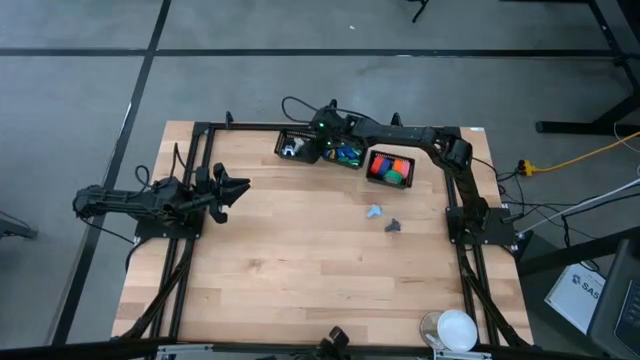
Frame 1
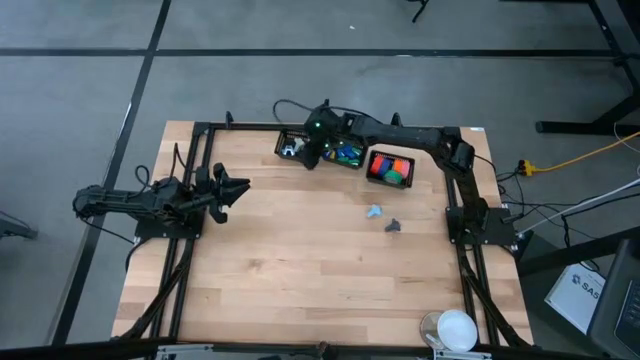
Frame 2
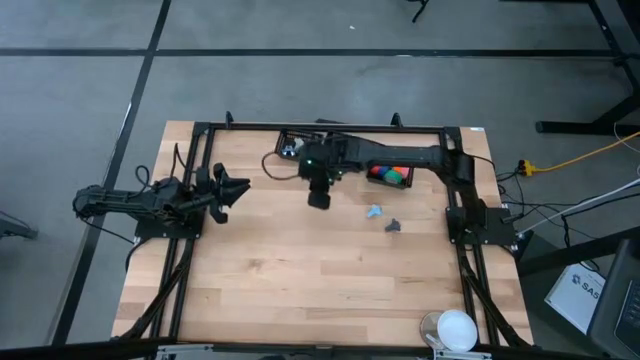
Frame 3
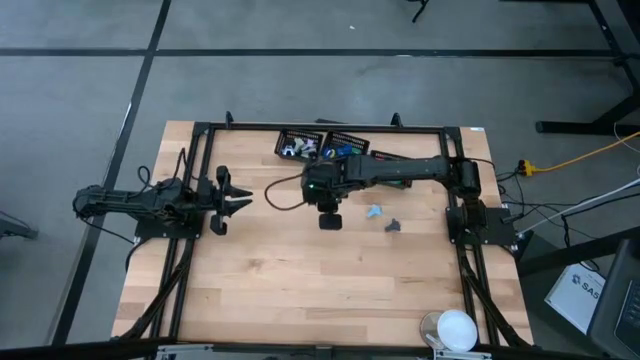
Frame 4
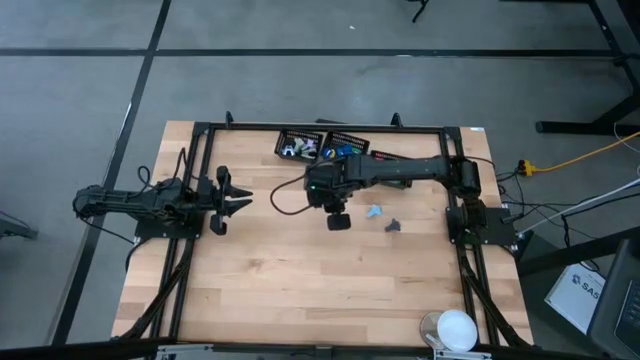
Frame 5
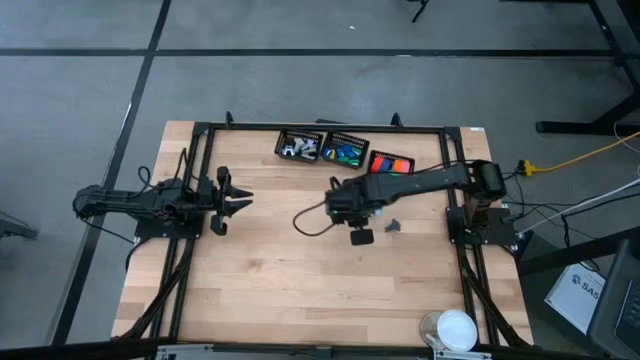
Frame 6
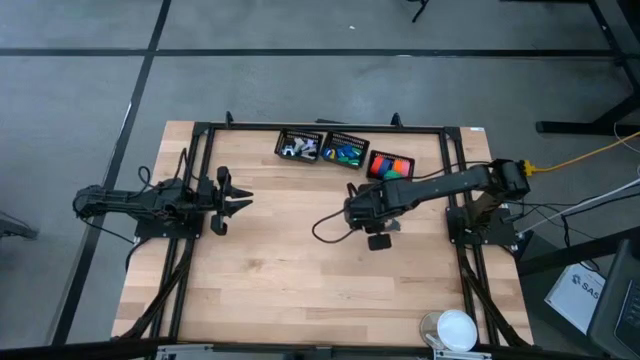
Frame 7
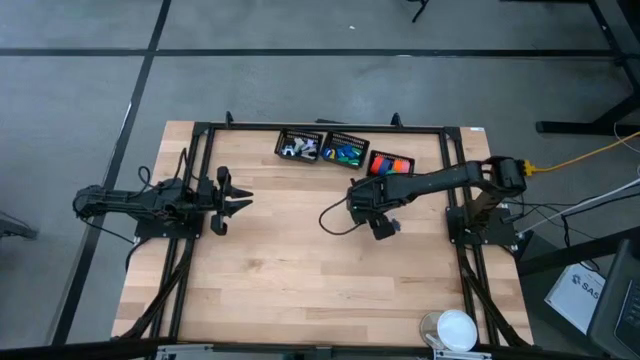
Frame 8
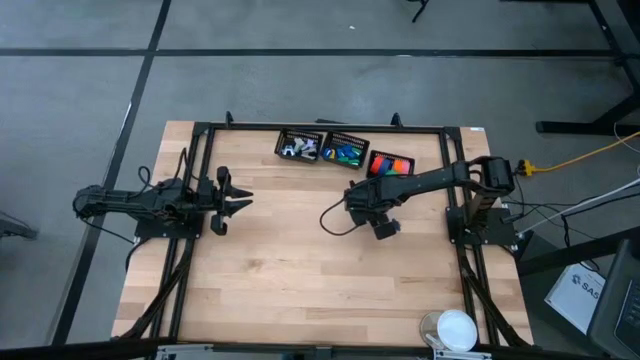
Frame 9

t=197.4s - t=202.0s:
Task: Pick and place Stapler, Stapler remover, tape
Put the blue stapler remover into the left black bin

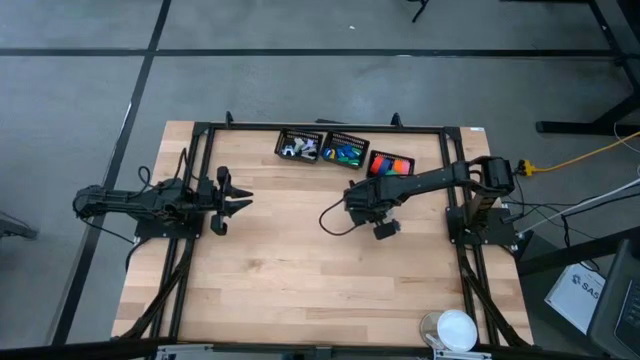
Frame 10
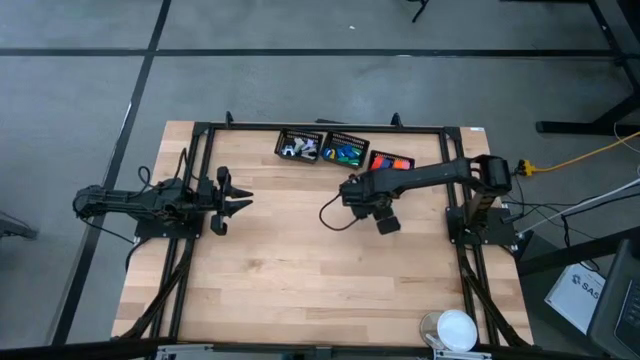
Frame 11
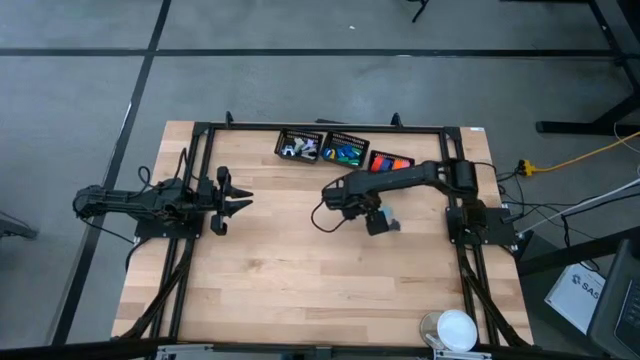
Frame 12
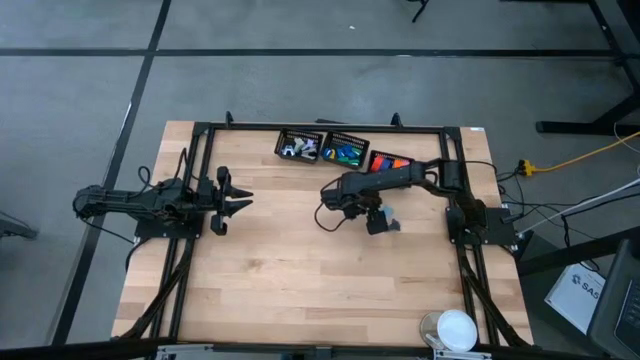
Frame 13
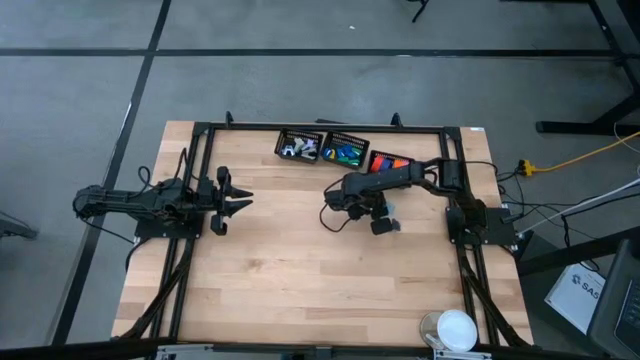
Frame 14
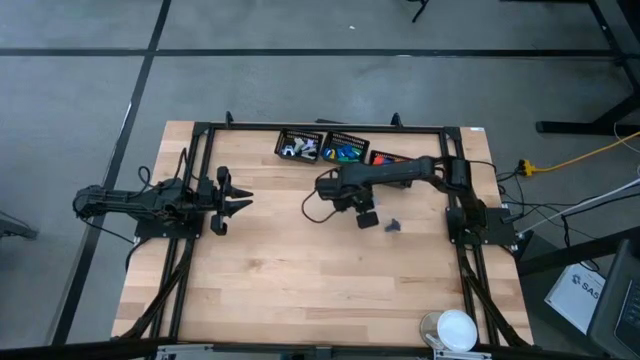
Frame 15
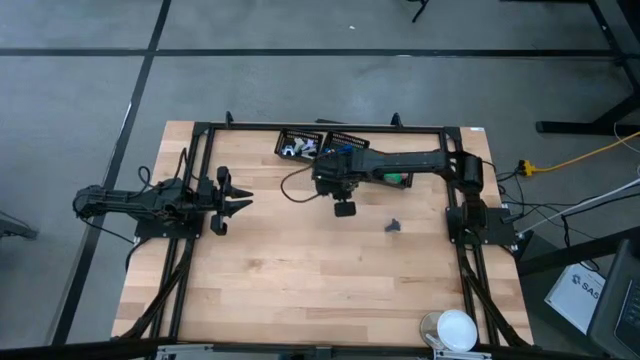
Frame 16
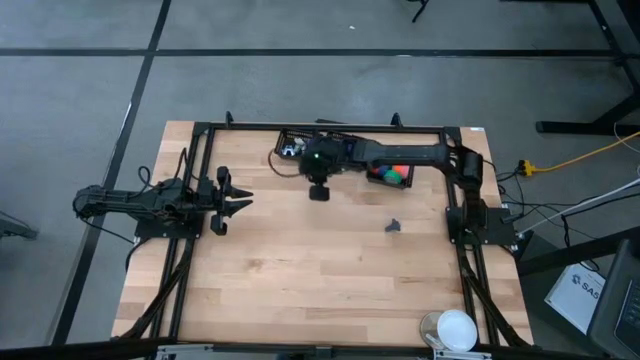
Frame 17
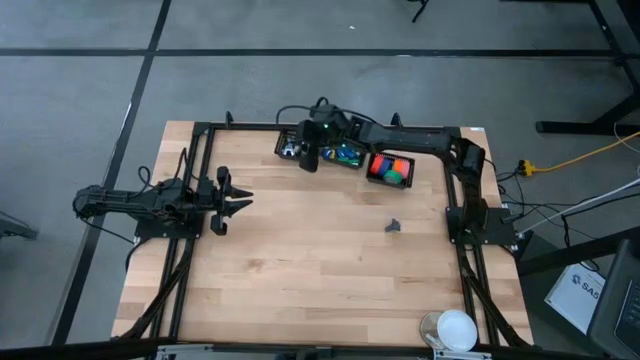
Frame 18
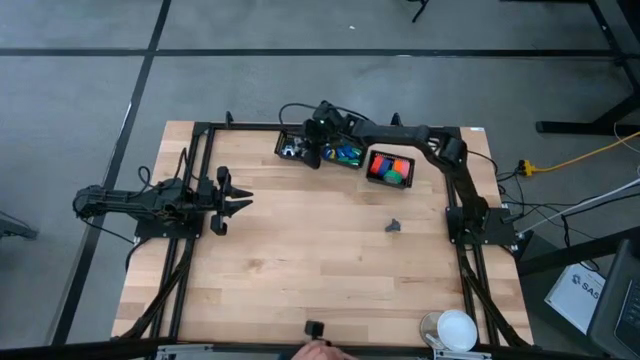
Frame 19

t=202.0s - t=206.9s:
Put the blue stapler remover into the left black bin

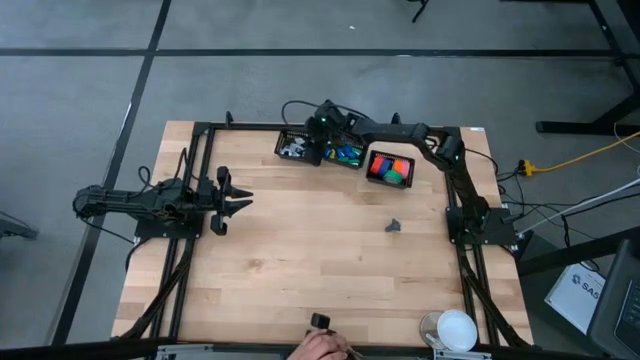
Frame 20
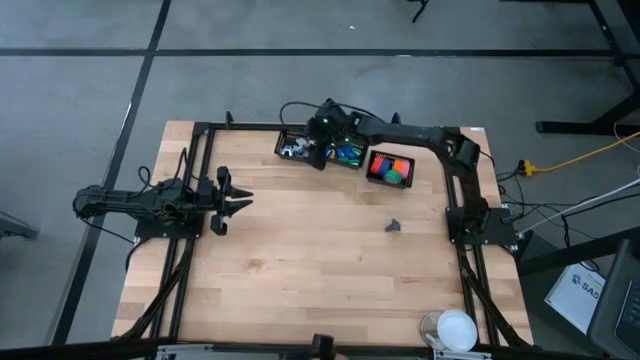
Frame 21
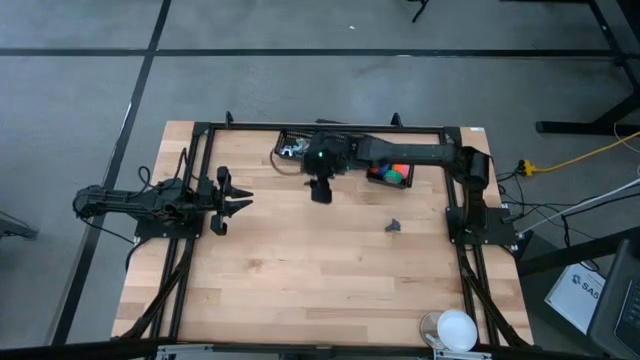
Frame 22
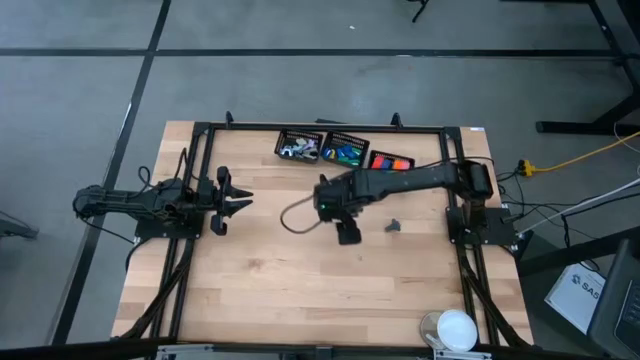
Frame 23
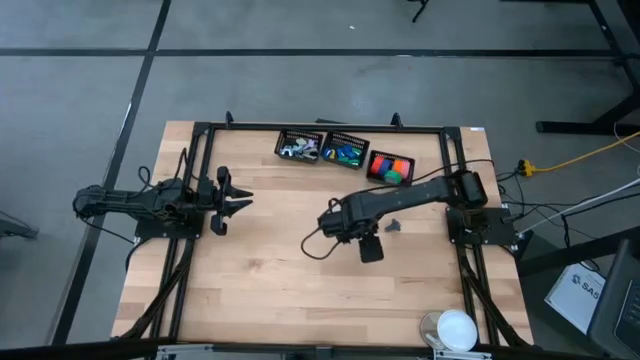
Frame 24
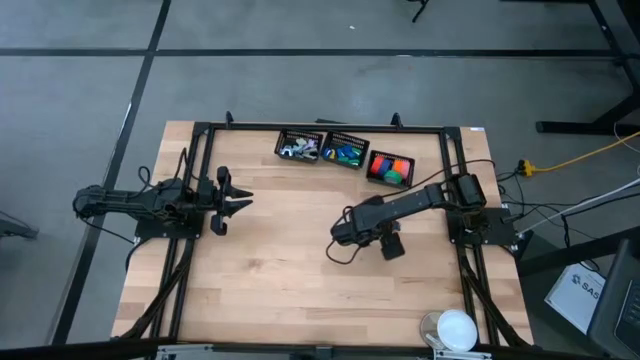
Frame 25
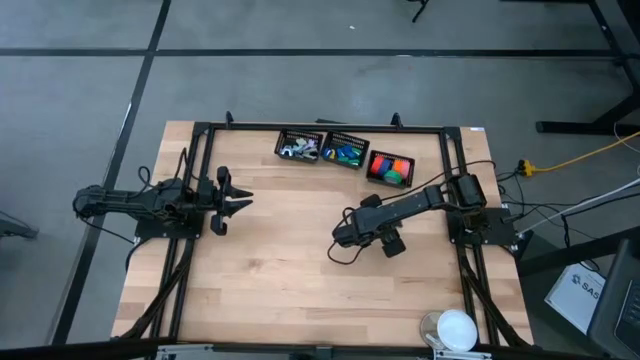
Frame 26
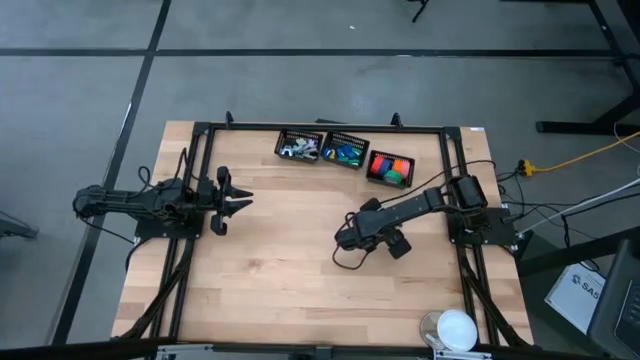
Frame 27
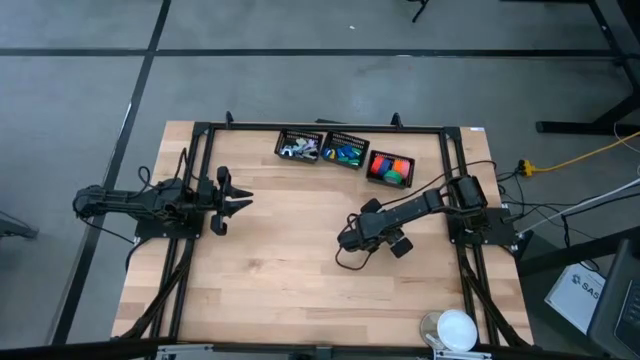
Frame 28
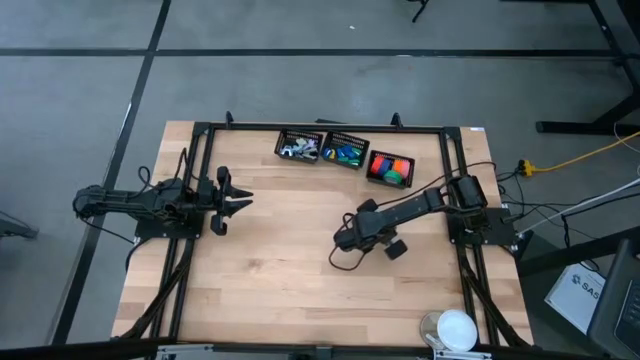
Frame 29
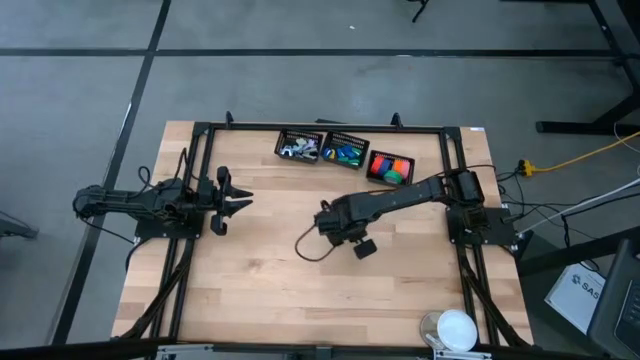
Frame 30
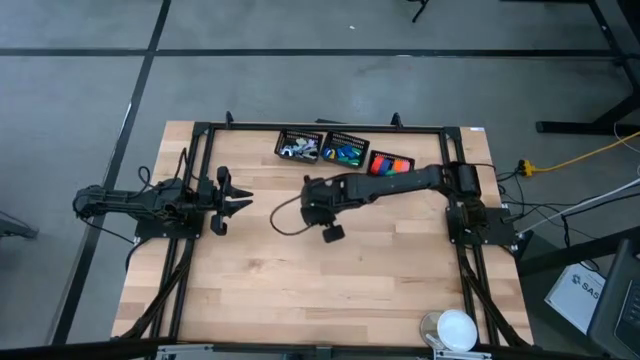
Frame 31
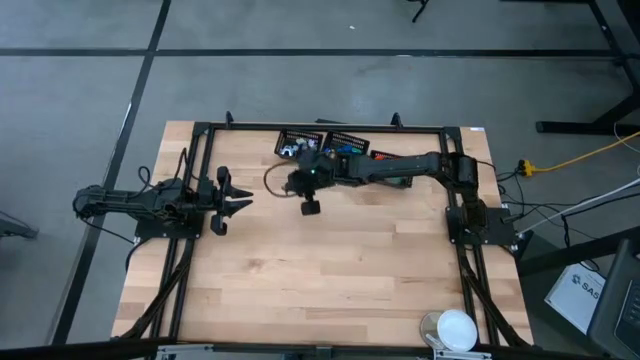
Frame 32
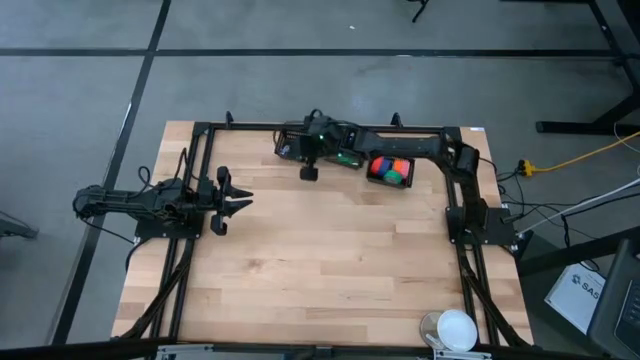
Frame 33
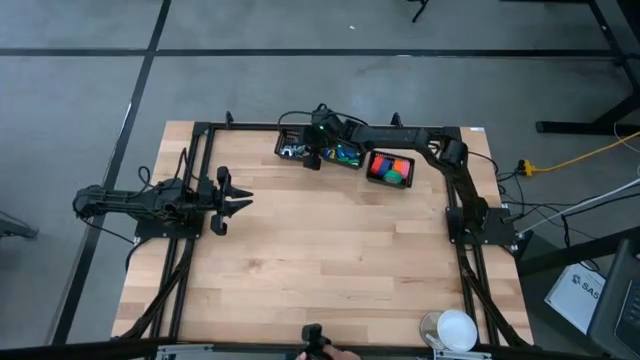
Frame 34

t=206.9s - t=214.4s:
Put the black stapler remover into the left black bin

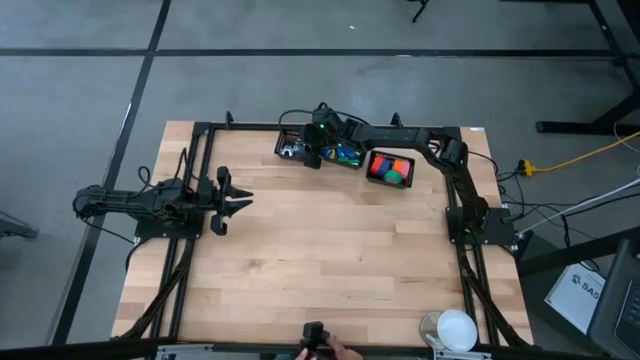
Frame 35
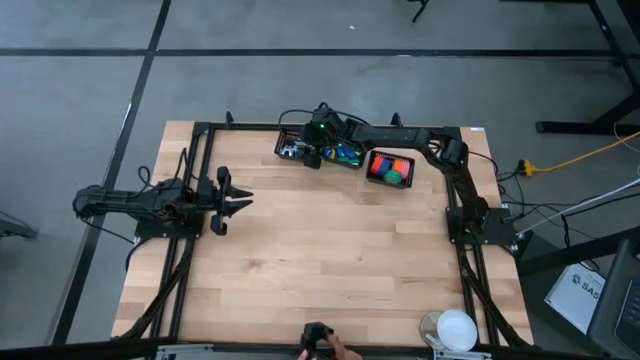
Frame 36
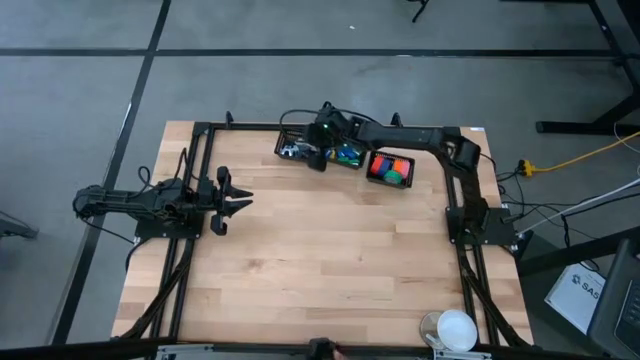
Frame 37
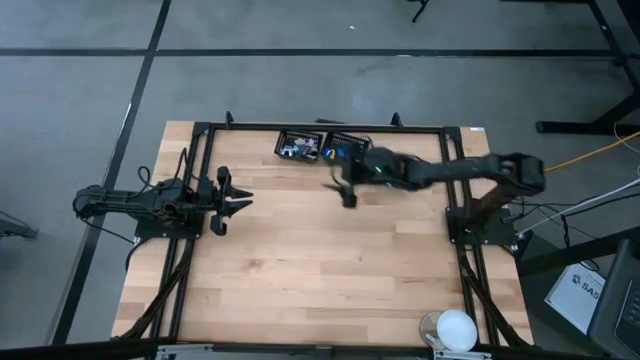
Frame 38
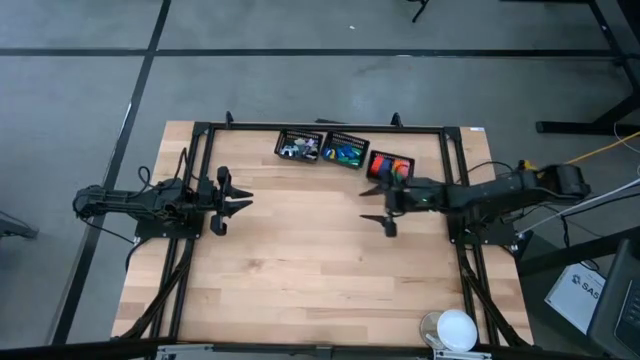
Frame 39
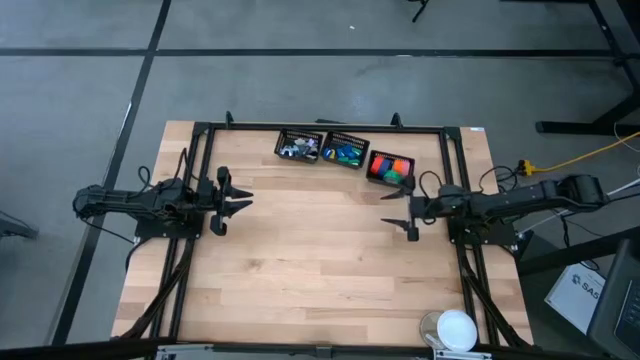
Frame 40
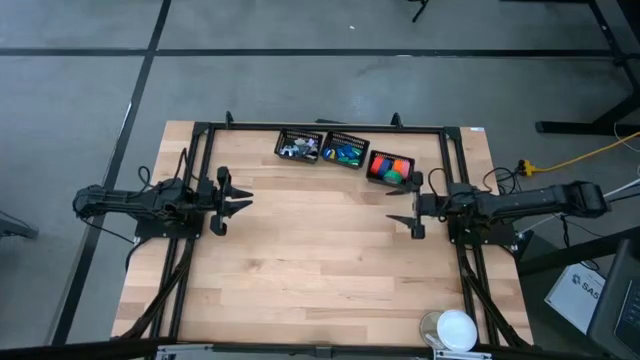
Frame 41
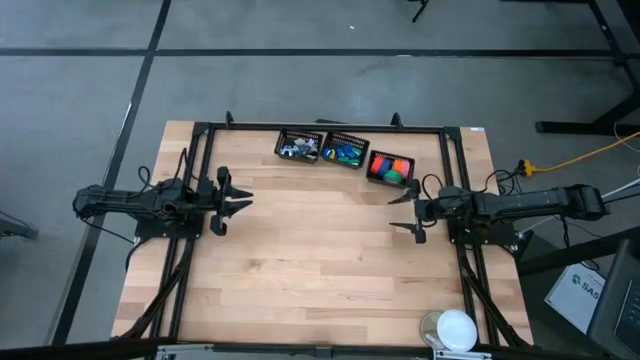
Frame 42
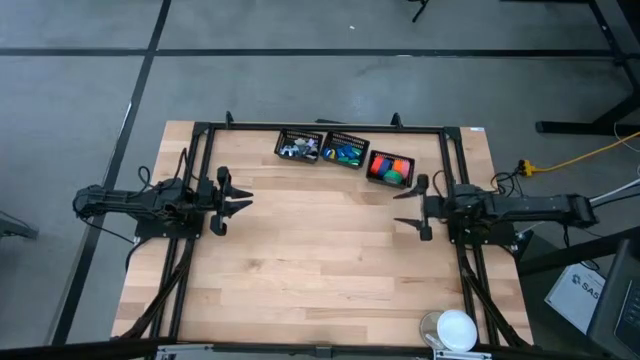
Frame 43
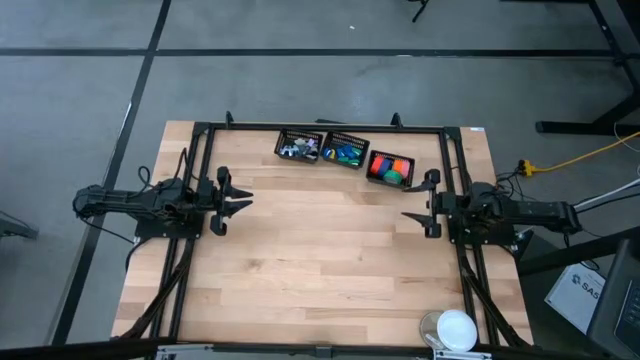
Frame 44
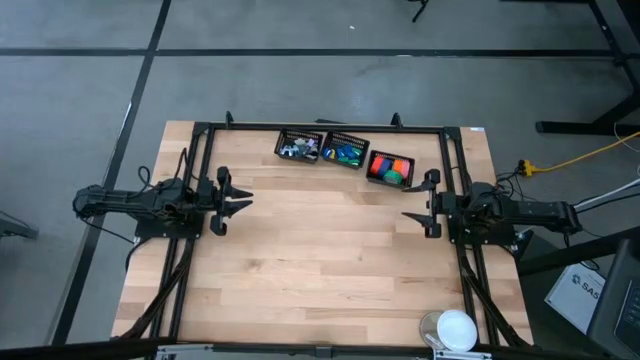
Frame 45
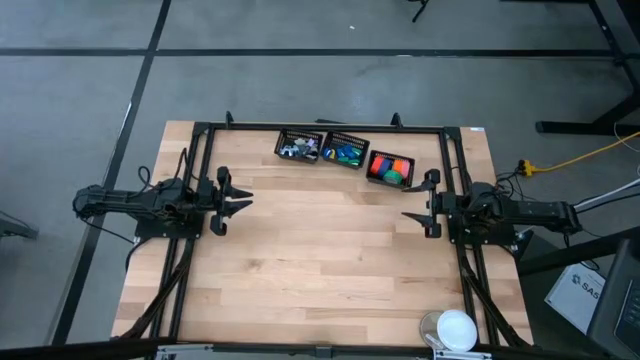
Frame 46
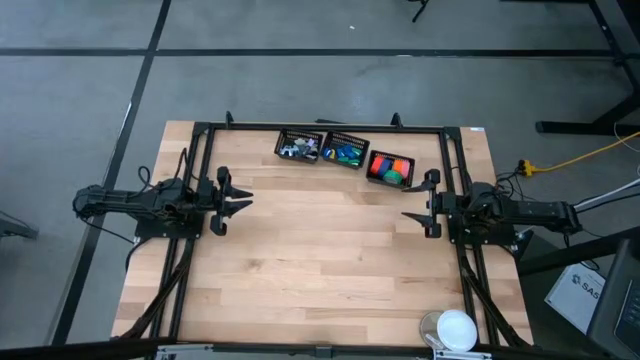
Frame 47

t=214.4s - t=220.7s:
Return to Home Position
